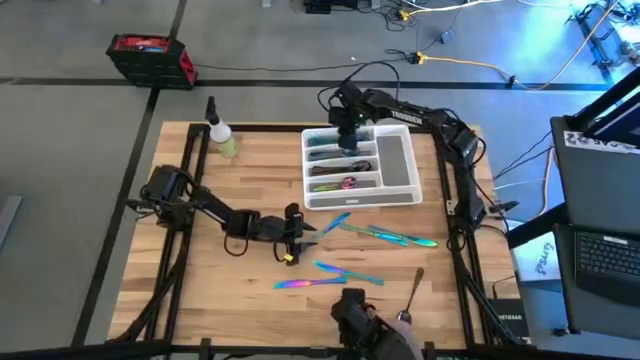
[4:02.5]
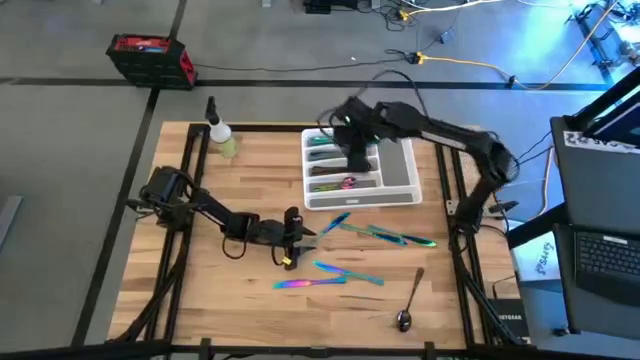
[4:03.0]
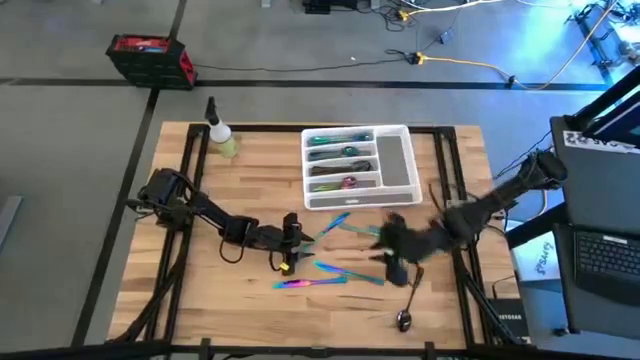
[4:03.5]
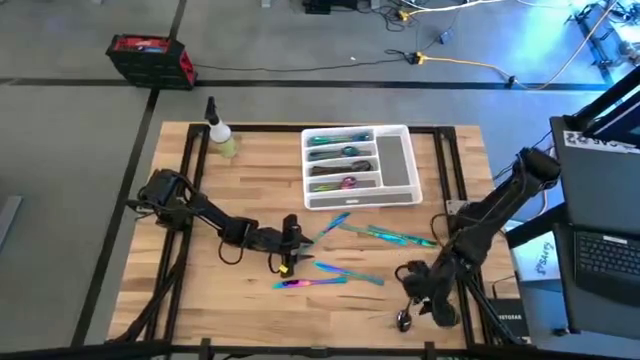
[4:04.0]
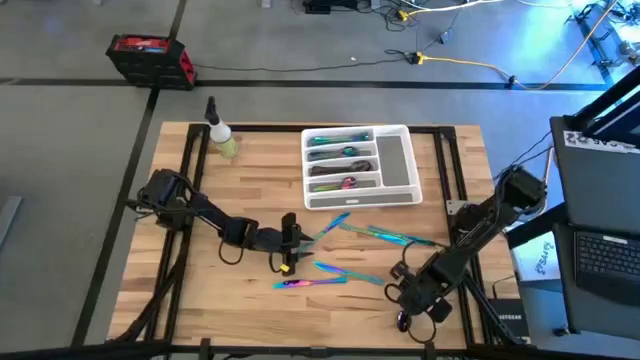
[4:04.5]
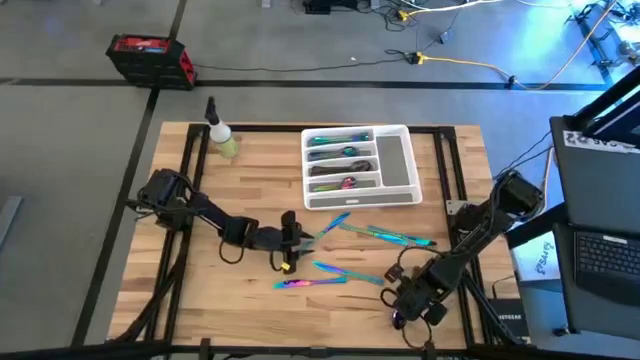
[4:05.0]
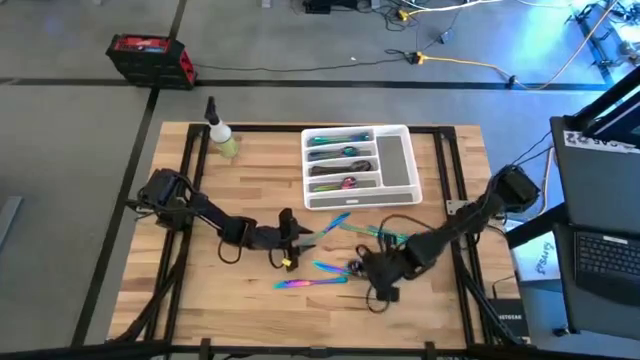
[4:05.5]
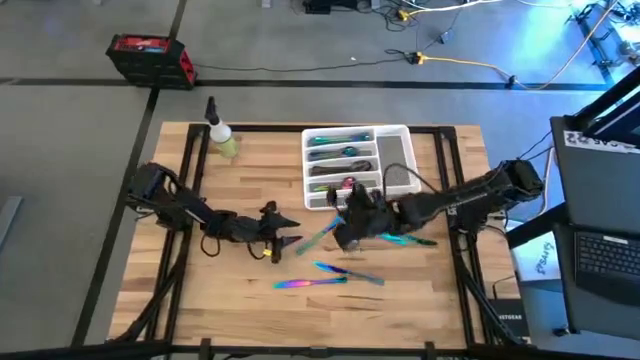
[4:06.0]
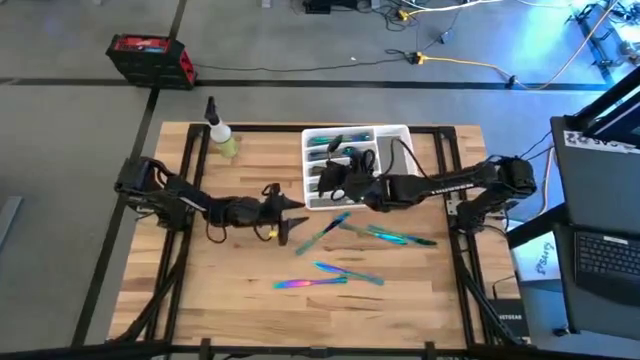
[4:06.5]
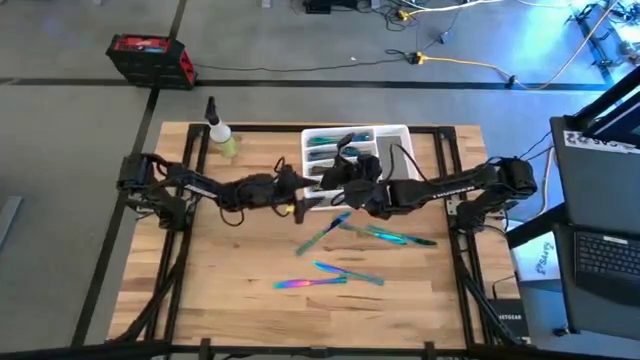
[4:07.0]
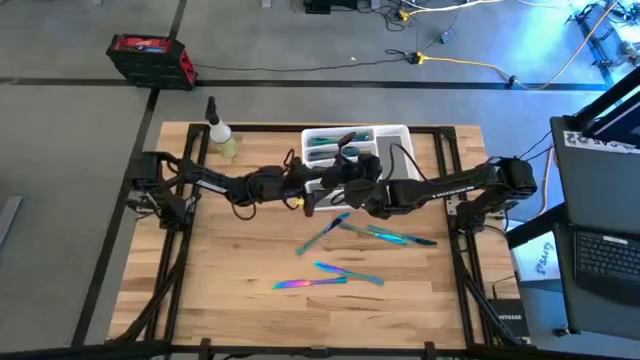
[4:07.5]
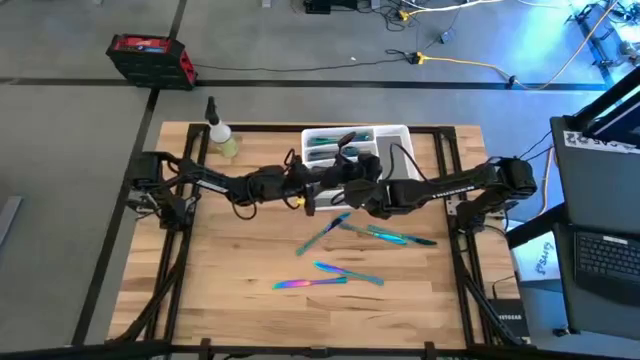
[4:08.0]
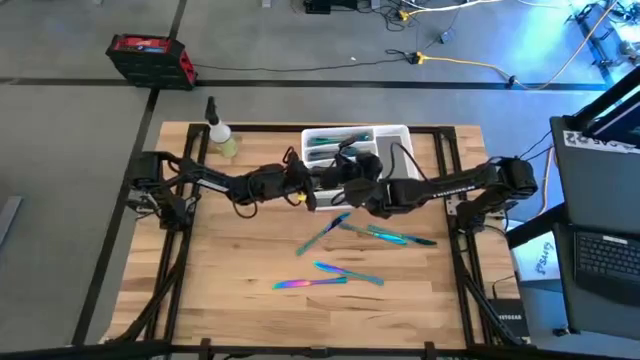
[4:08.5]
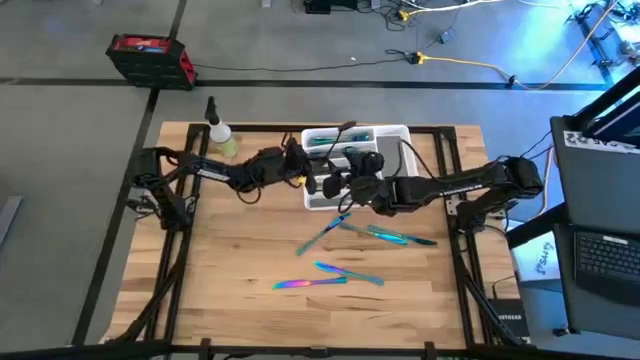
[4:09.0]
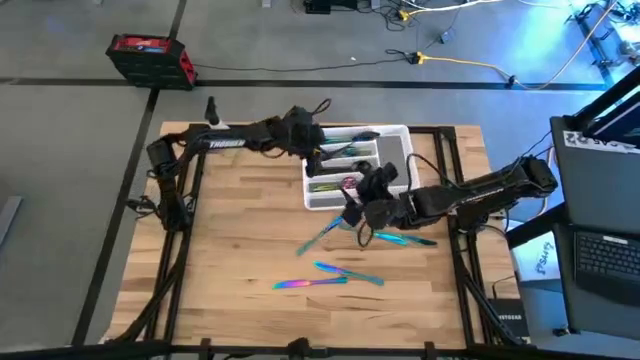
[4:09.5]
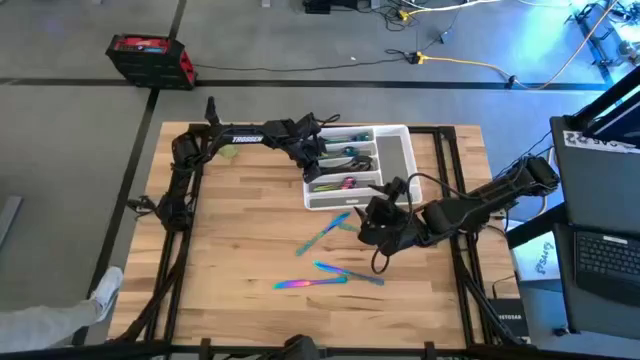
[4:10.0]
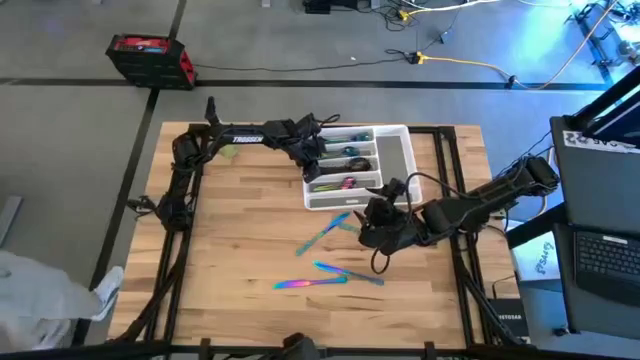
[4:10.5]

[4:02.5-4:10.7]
Task: Sort silverware
Put the black spoon on the white silverware tray

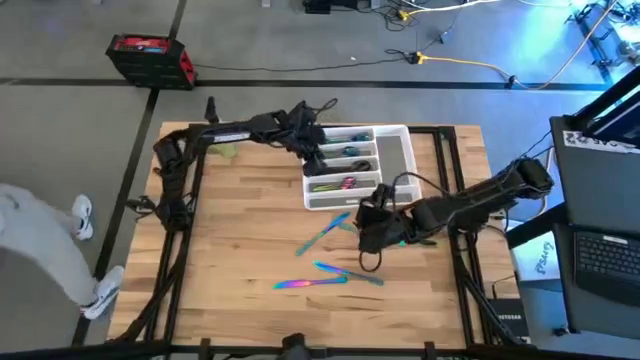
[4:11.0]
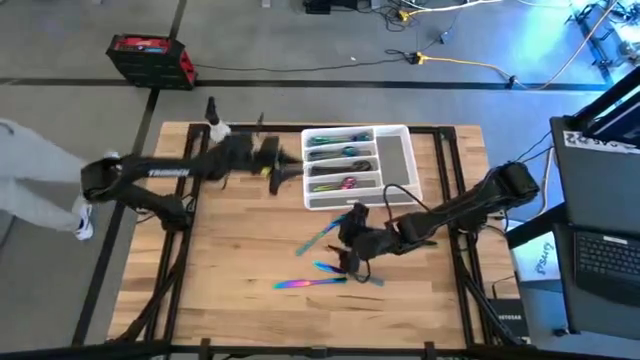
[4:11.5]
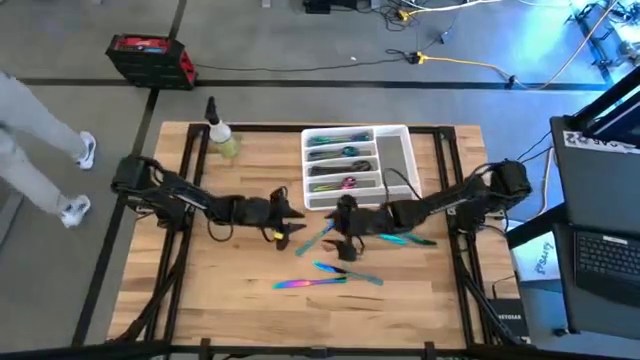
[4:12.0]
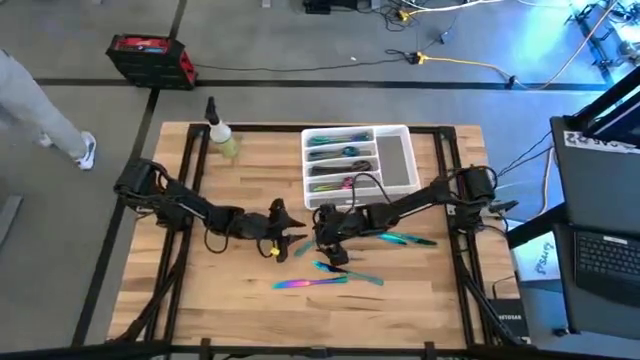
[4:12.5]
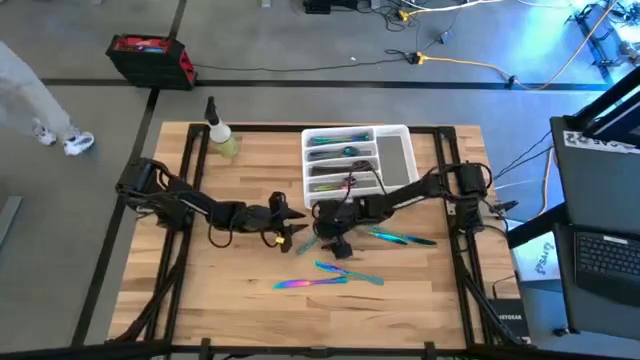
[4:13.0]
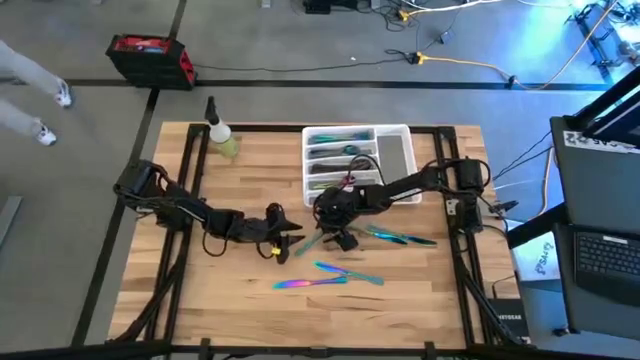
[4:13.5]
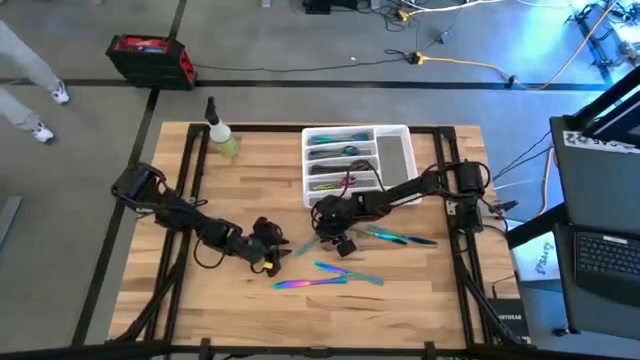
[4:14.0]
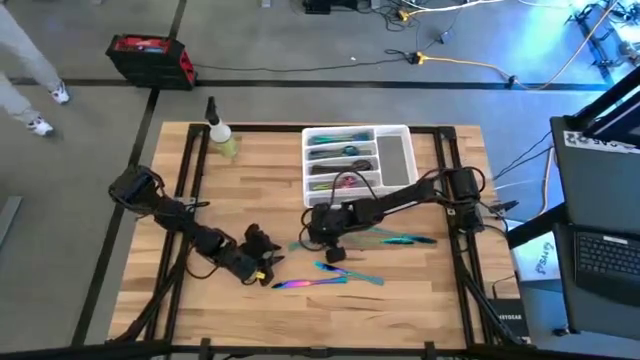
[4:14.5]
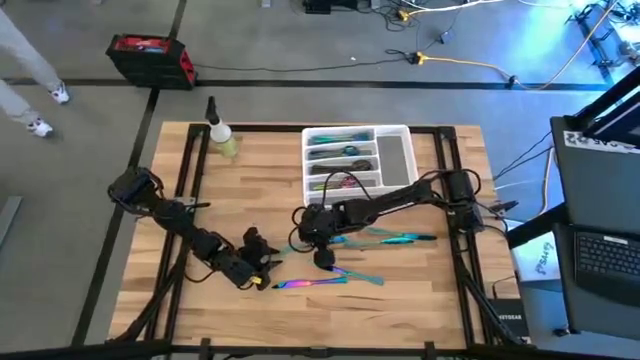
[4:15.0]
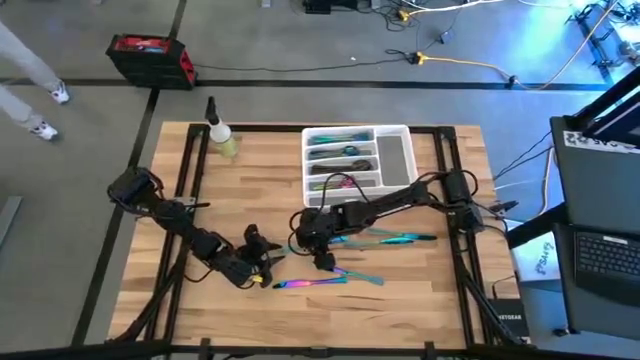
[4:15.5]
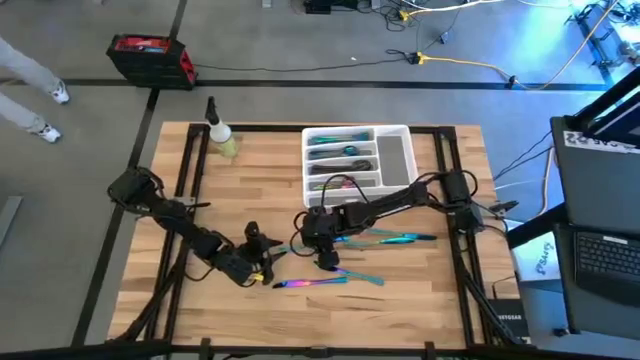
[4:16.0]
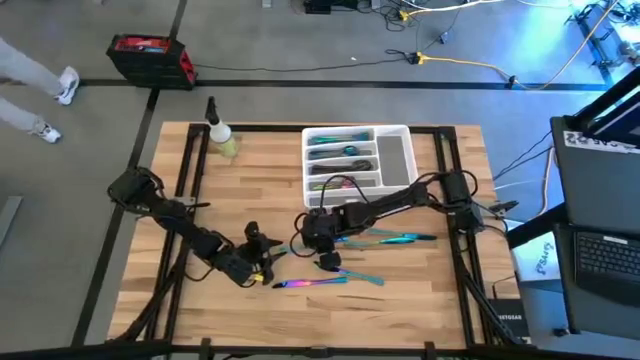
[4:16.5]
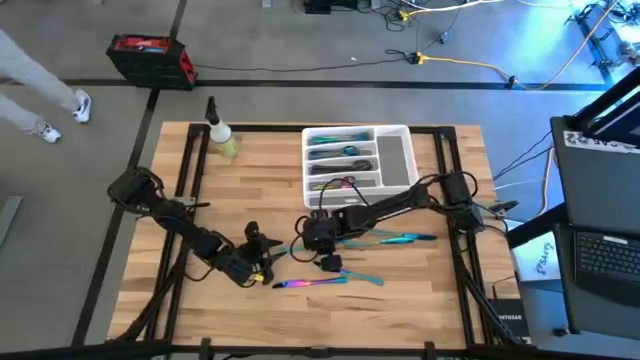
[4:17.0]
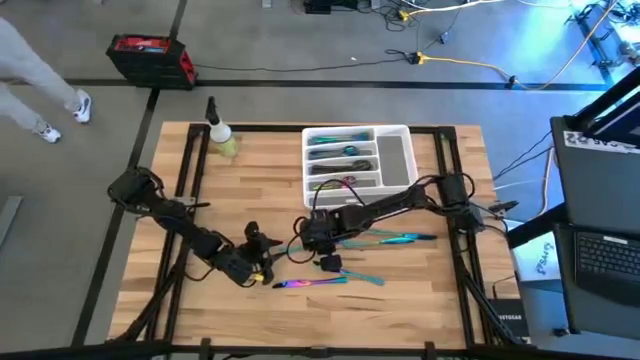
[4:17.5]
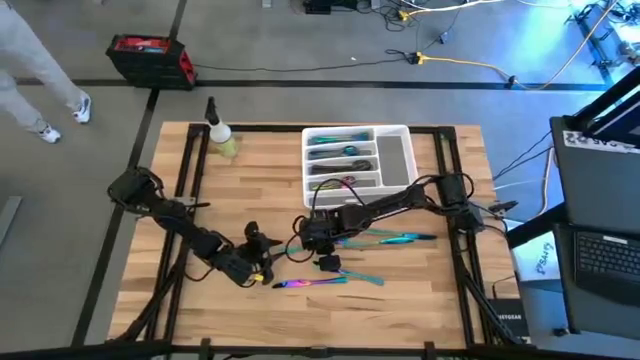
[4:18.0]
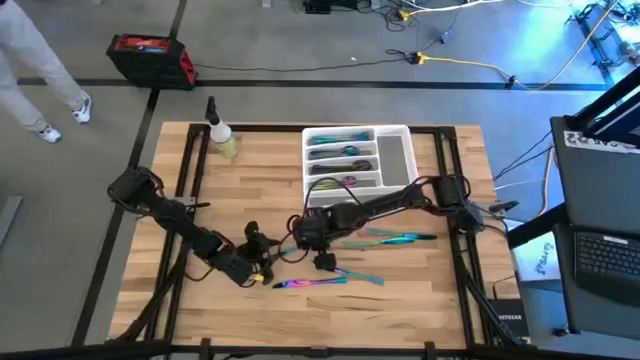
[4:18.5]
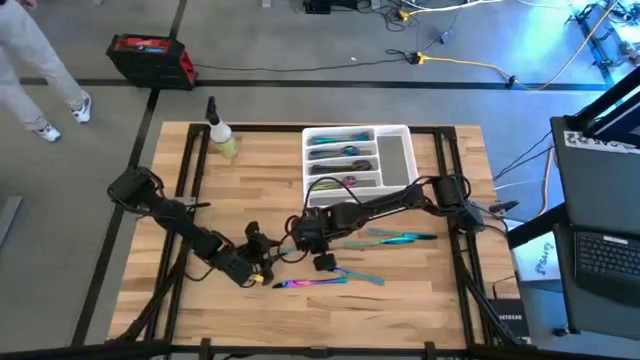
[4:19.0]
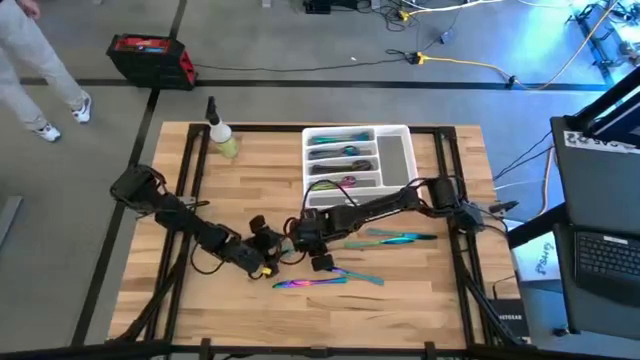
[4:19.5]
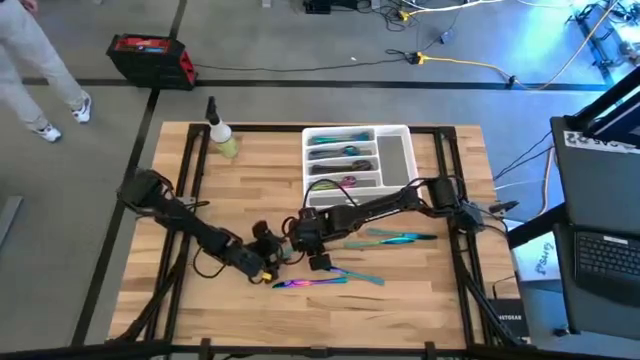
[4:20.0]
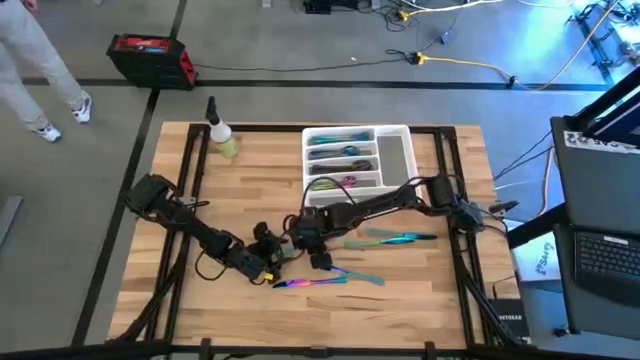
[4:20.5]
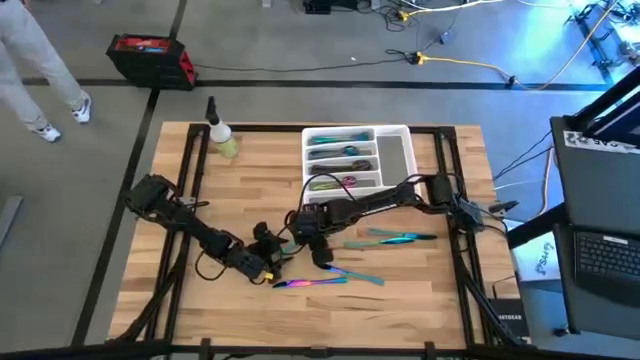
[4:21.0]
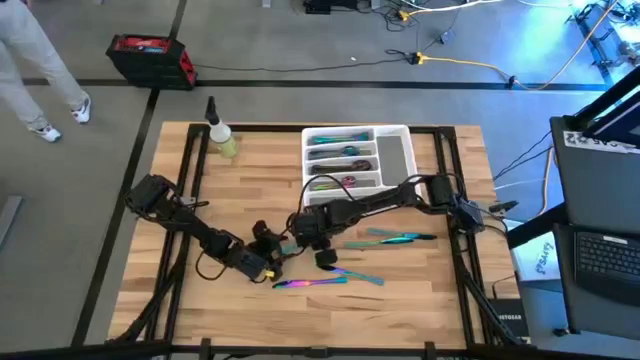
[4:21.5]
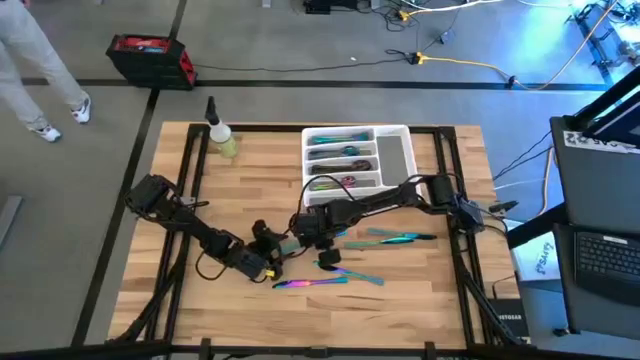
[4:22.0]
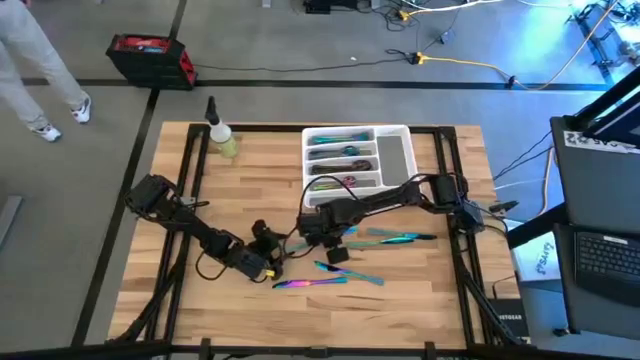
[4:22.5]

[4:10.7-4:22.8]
Put the blue knife on the white silverware tray

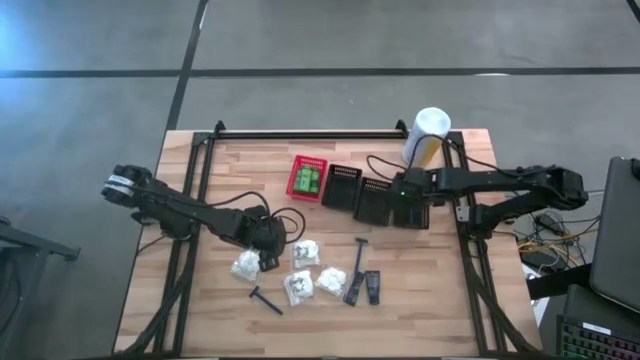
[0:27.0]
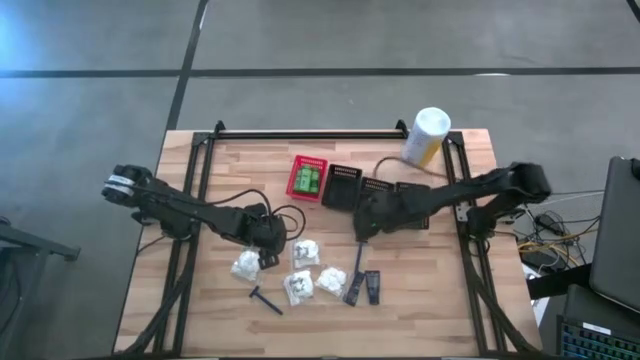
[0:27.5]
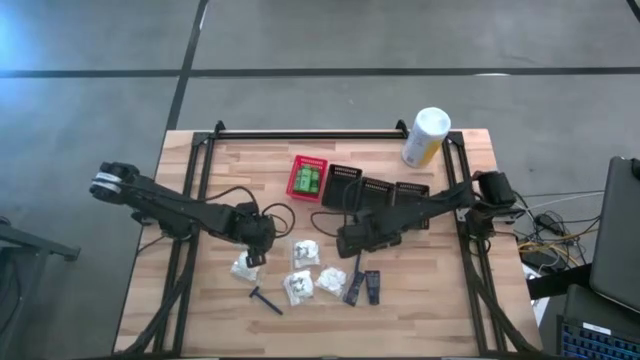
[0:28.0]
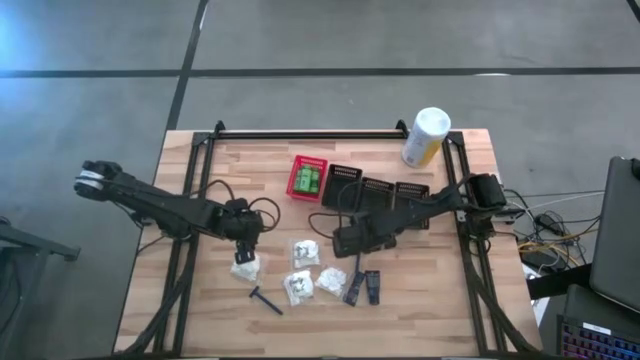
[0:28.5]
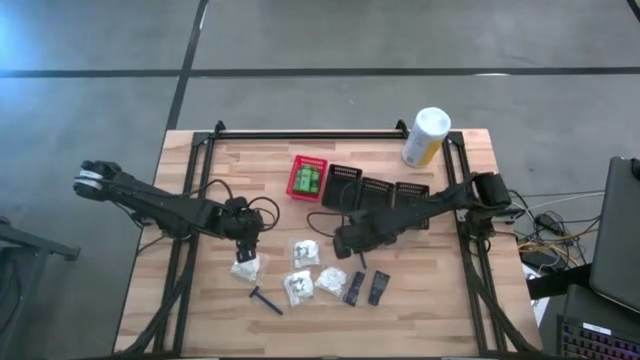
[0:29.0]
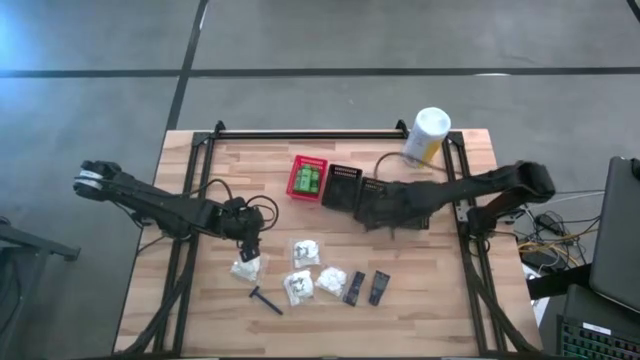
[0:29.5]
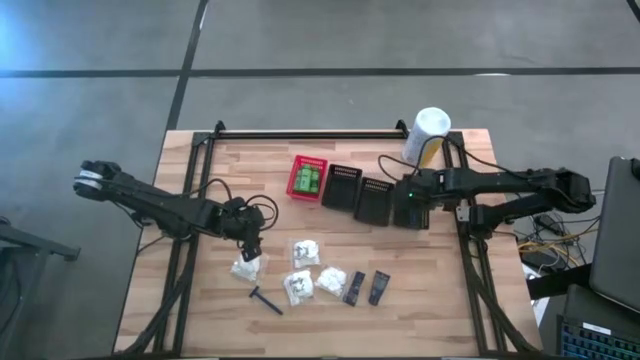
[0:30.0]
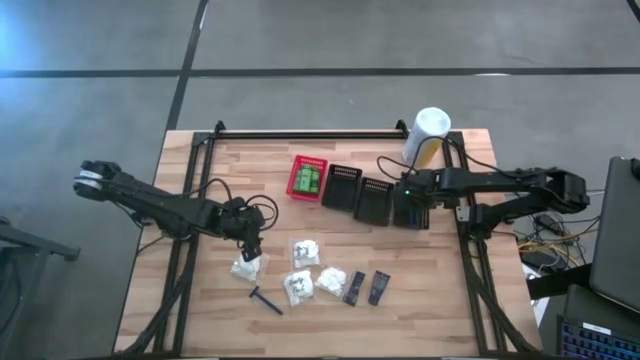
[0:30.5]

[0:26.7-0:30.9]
Task: Pick & Place Travel size toiletries
Put the razor into the right black bin
